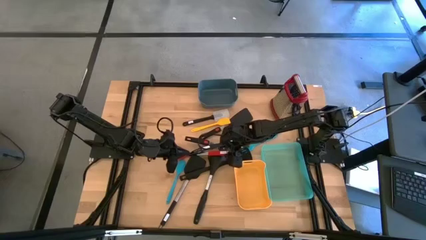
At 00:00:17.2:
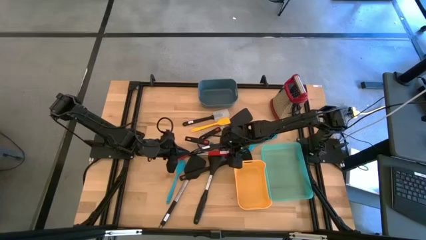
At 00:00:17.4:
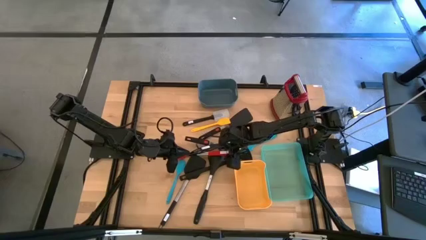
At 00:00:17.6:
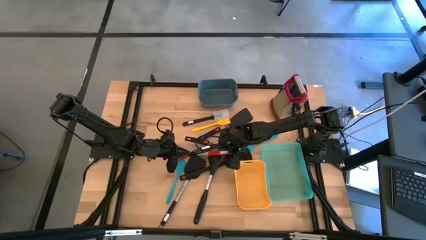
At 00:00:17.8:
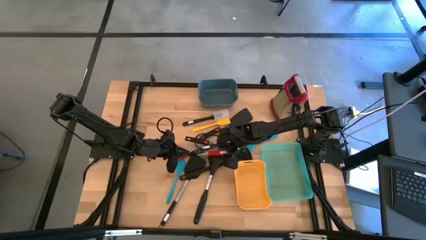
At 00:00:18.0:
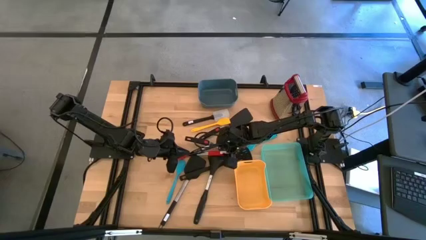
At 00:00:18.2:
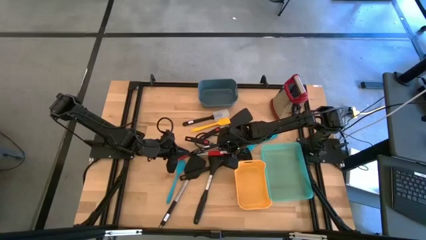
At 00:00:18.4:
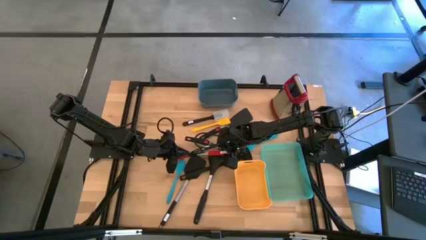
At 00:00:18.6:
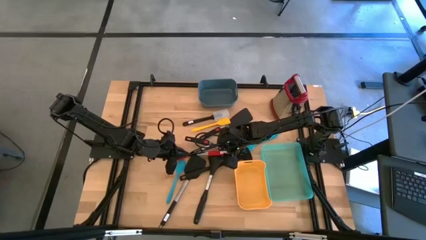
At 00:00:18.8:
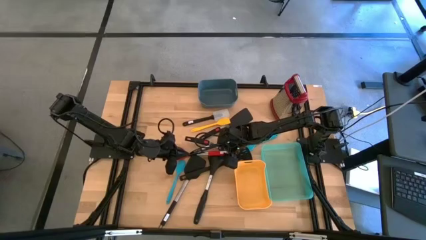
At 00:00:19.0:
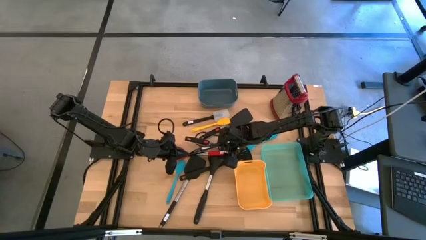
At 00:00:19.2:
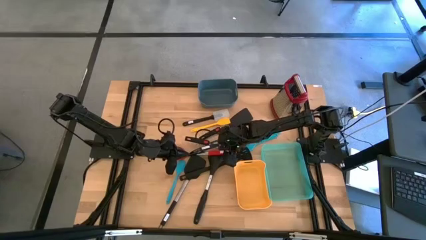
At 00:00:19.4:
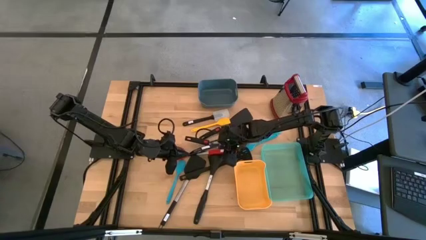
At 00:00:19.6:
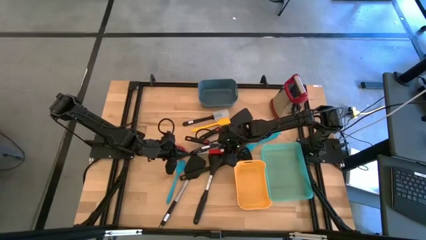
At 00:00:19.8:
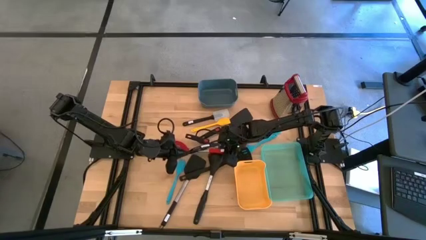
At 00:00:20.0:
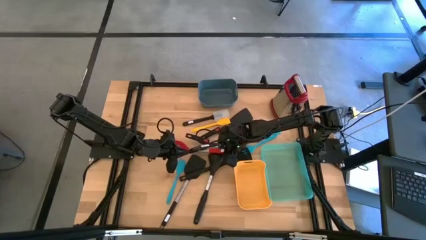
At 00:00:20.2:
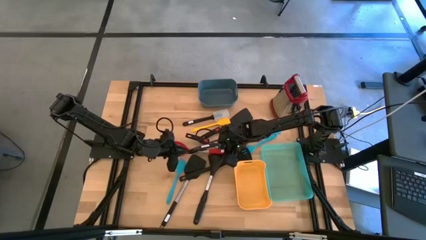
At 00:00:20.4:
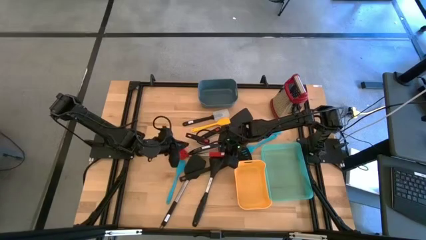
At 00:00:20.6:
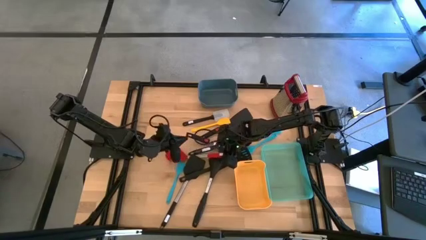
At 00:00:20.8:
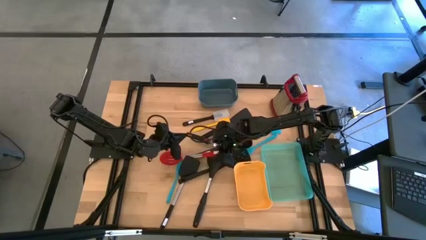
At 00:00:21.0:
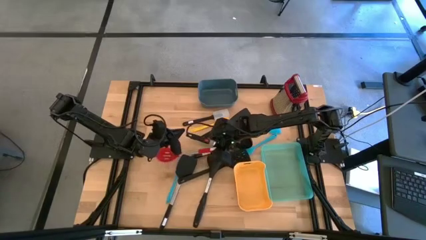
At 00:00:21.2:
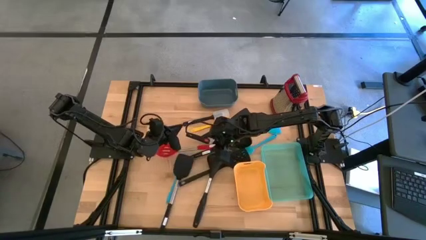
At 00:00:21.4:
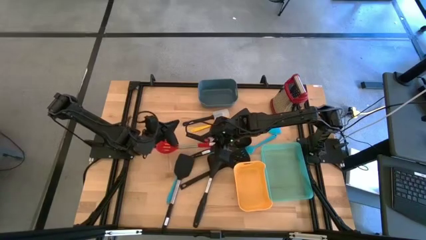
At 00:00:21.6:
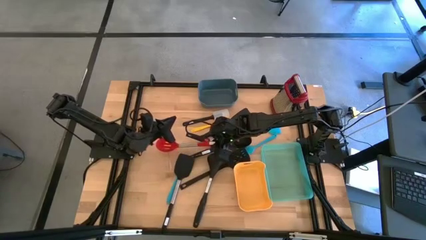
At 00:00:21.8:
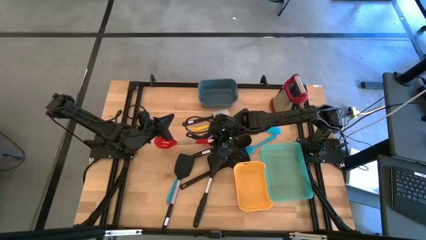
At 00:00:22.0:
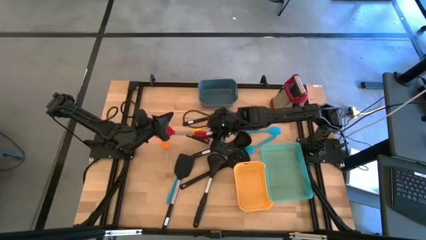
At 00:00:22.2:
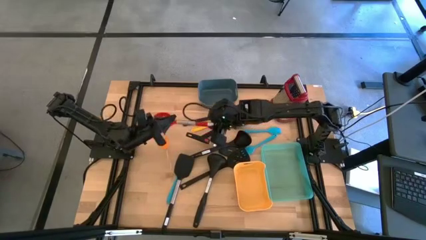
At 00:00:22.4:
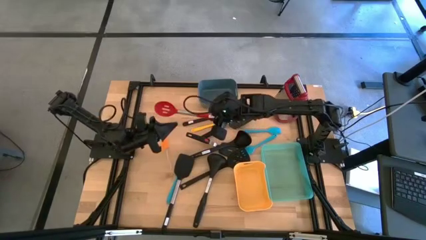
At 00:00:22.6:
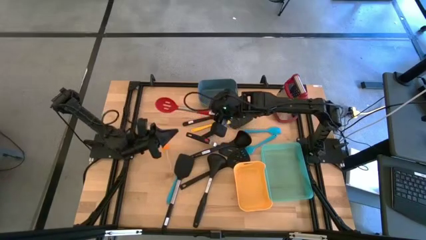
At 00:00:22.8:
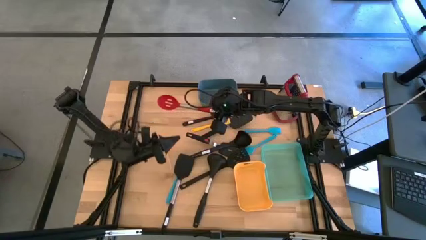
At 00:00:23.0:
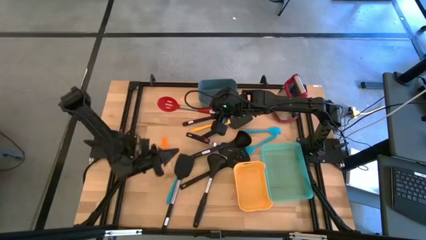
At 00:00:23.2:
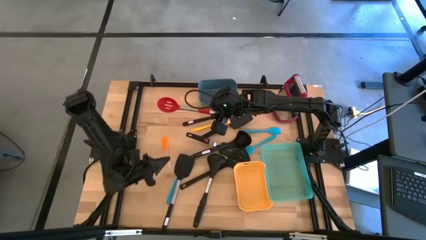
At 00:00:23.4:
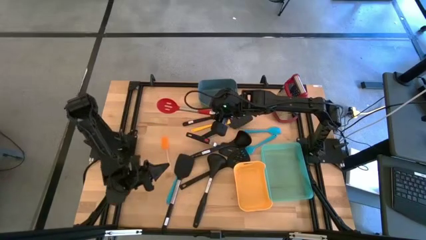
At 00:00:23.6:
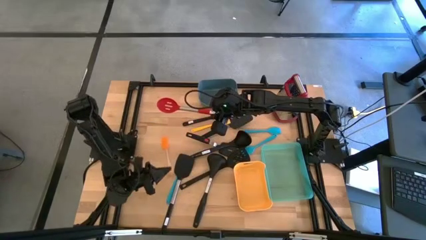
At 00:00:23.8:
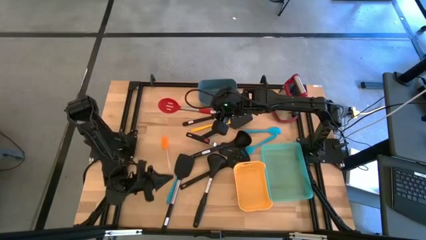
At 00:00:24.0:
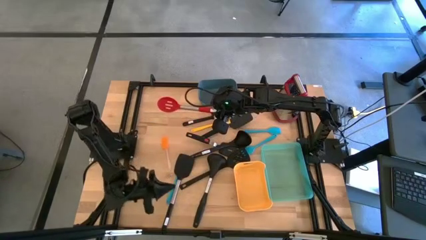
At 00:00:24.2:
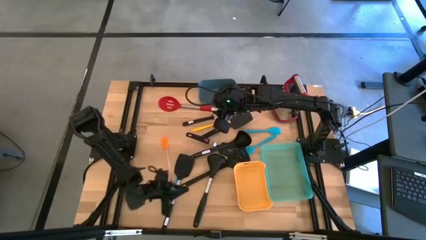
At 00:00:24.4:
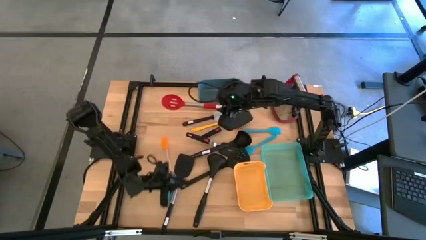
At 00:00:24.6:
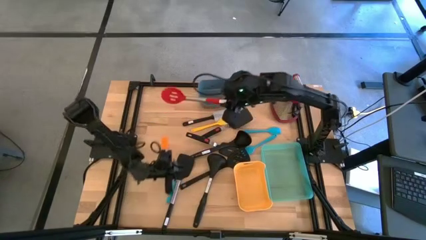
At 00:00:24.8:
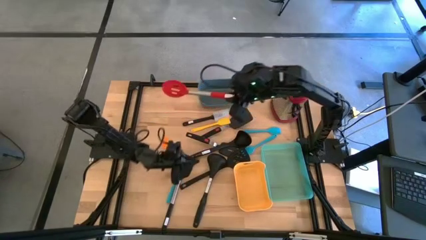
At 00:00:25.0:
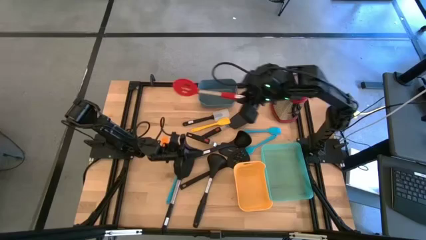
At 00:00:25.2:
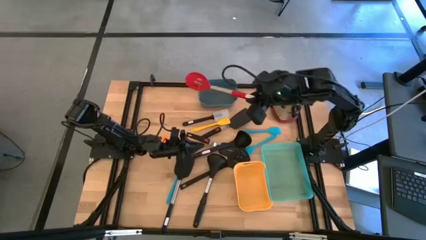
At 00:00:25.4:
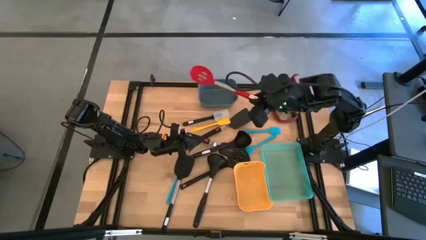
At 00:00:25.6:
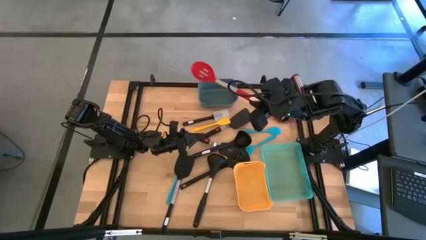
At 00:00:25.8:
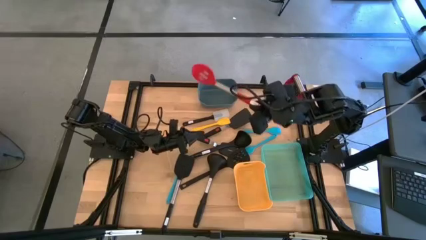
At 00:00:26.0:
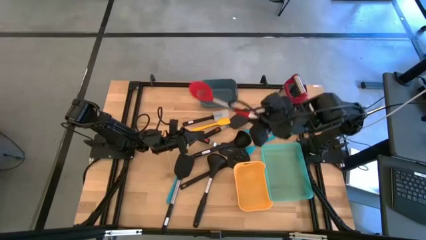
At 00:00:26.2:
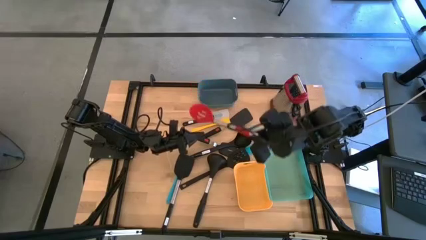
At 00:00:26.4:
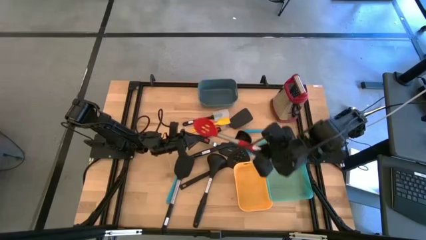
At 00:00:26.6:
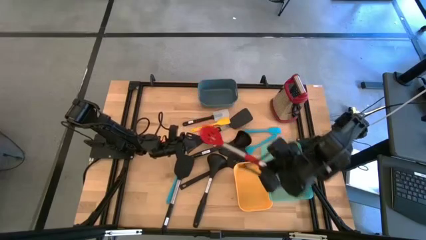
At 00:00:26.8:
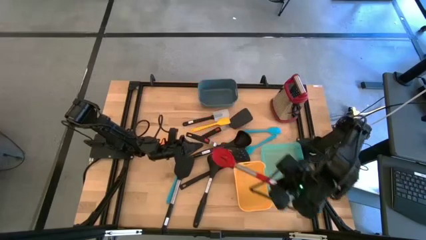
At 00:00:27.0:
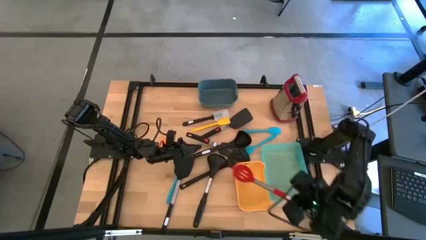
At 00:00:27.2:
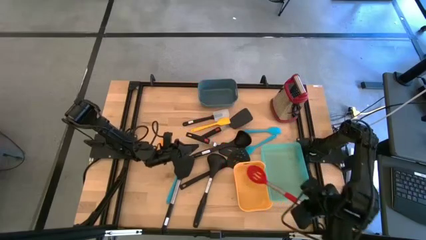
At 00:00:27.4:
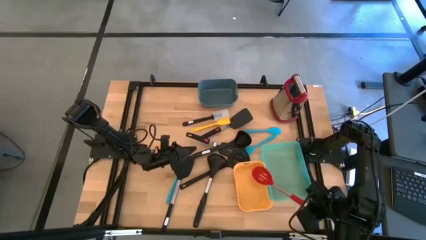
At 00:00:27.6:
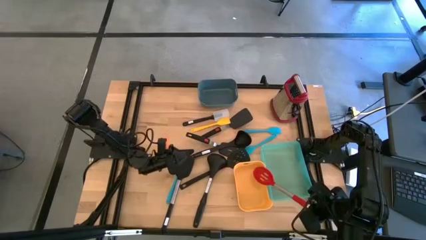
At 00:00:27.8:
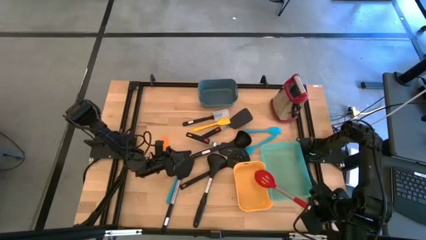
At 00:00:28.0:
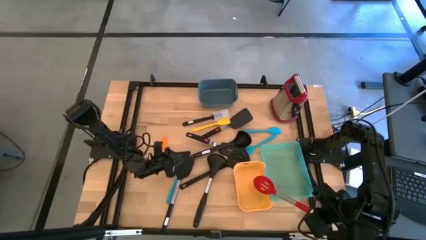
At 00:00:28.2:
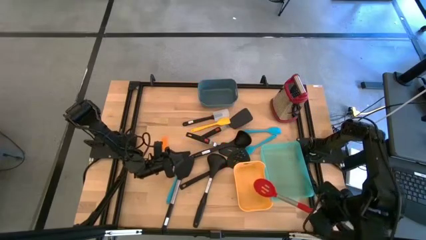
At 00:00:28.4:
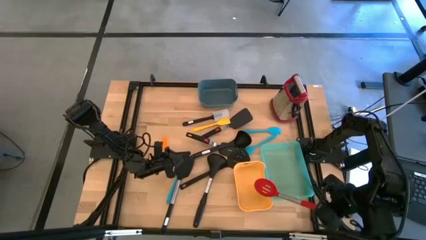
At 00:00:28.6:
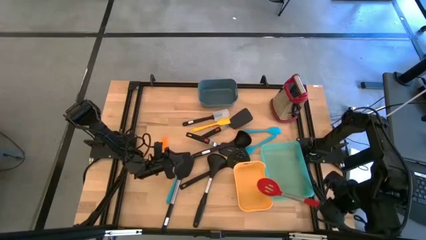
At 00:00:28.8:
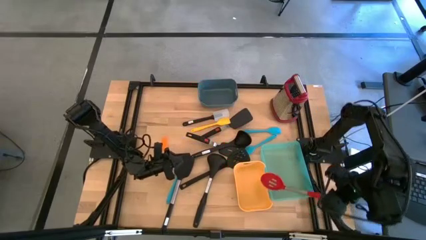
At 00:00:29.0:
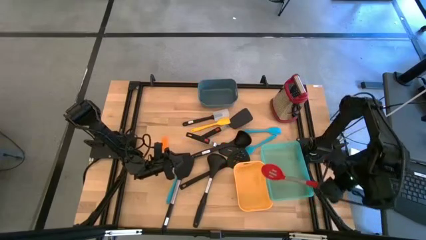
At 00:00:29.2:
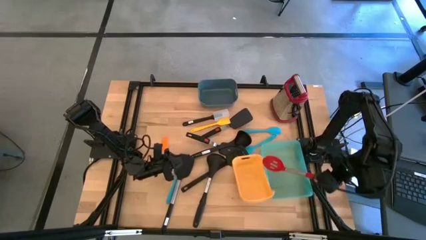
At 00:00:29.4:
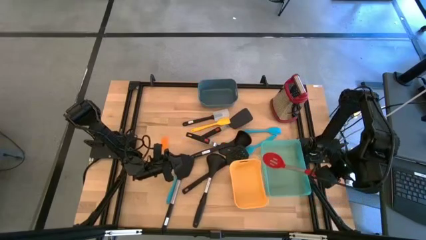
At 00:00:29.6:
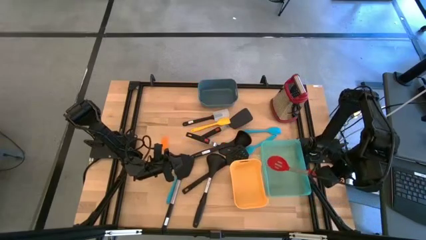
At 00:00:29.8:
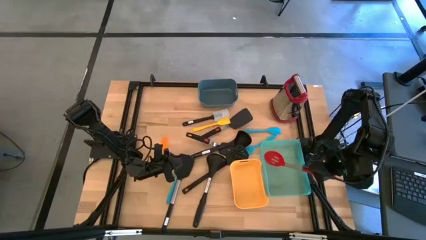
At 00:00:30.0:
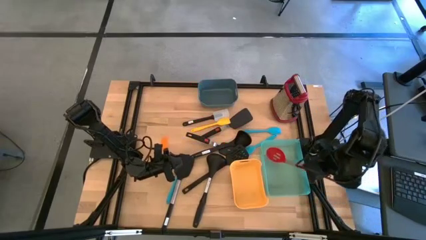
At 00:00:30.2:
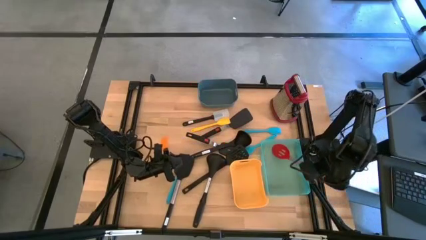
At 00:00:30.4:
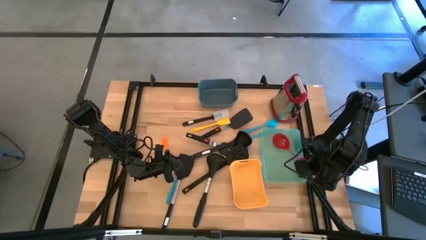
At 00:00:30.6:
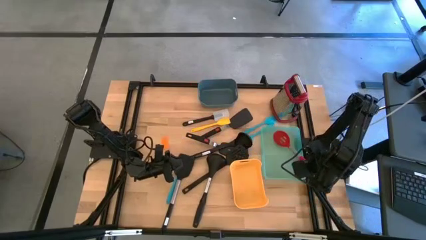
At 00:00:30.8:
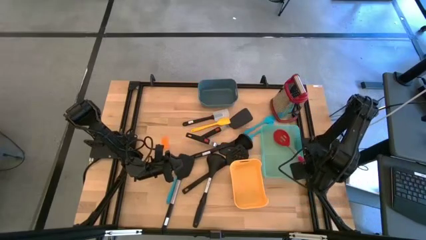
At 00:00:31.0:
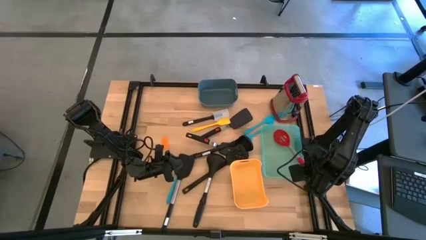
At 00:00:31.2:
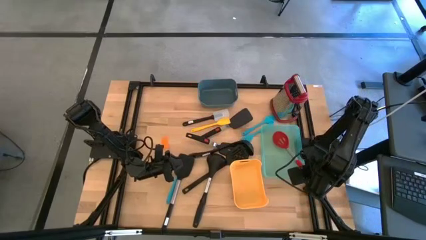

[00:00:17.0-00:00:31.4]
Task: Pick & Place Kitchen Items
Put the red serving spoon into the green bin
